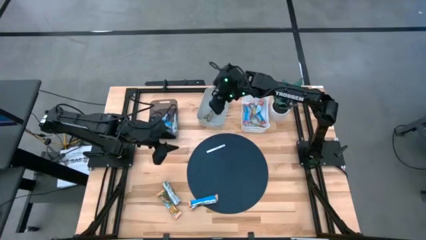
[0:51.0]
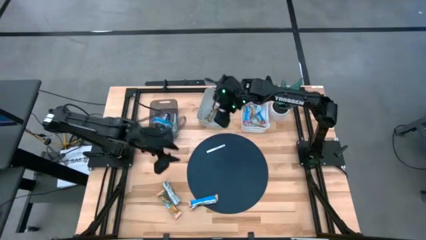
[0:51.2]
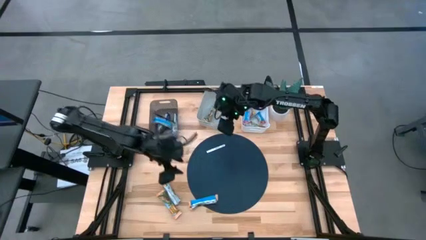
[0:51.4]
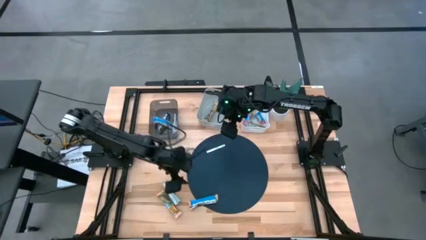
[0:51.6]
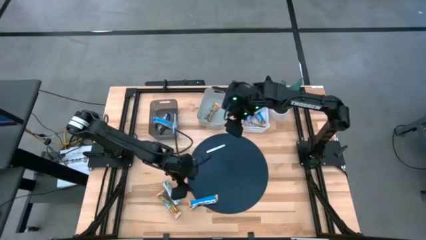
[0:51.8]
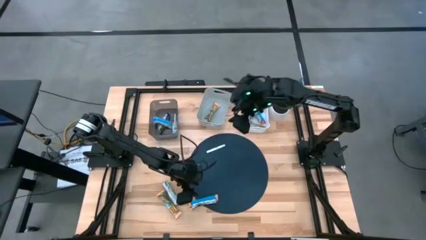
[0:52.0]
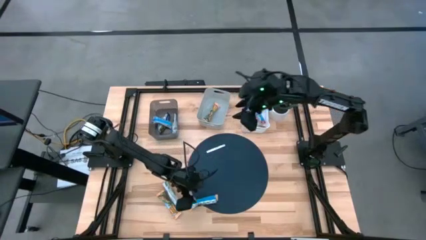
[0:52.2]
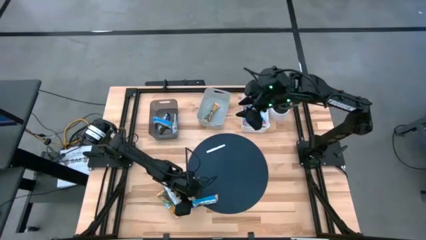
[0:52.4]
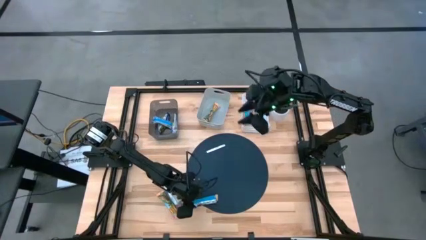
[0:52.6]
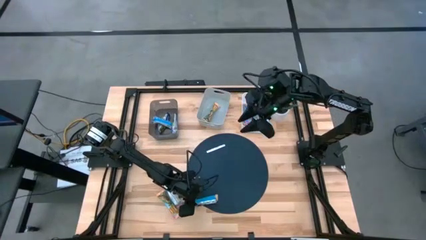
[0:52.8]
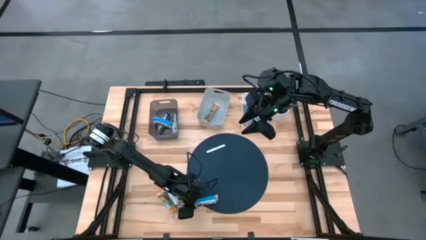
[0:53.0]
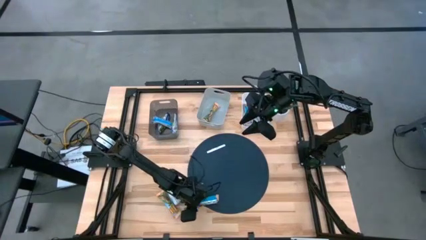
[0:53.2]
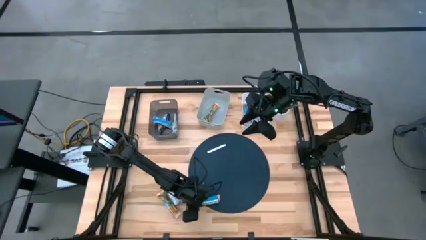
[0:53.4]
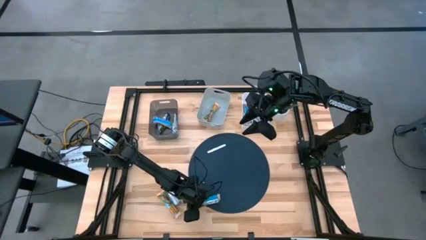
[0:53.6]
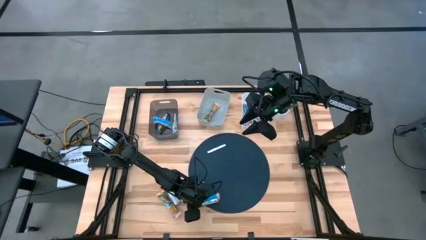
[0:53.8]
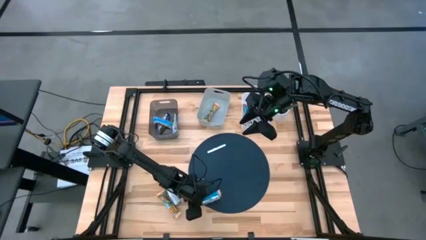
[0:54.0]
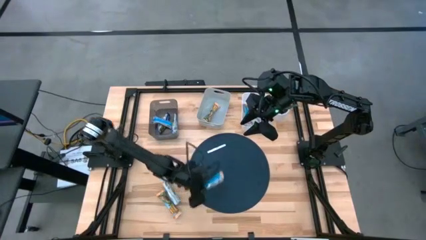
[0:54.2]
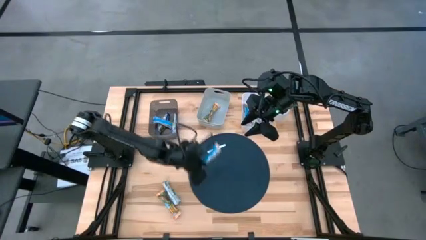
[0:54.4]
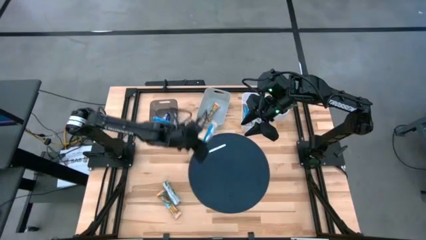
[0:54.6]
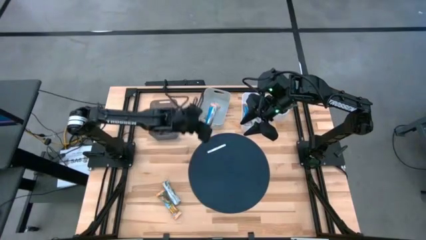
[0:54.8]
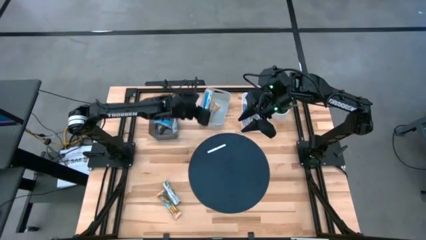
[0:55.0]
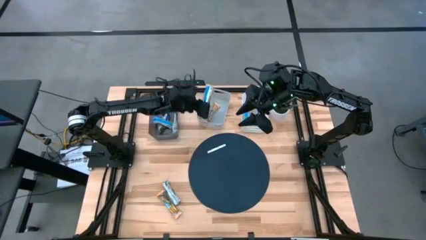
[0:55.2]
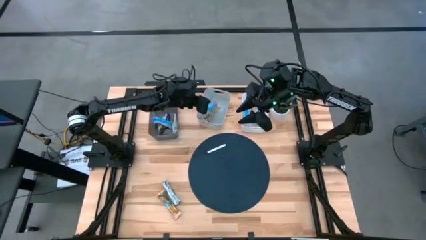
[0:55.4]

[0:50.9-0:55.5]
Task: Pick and place Granola Bars by type
Put the yellow granola bar into the gray bin

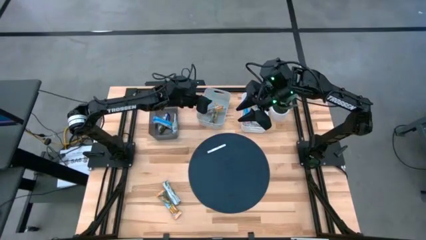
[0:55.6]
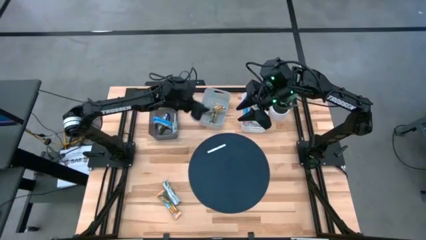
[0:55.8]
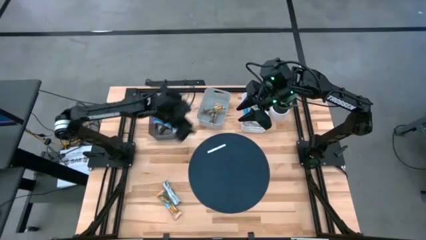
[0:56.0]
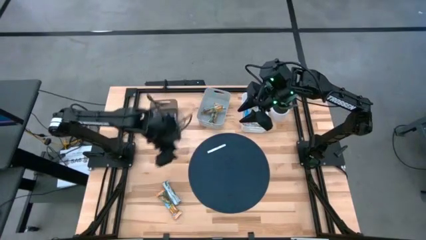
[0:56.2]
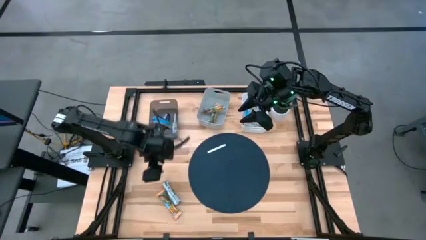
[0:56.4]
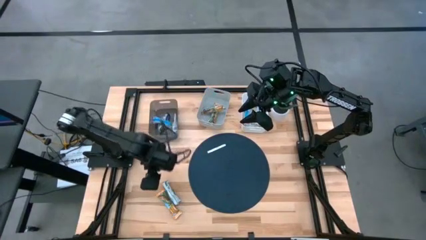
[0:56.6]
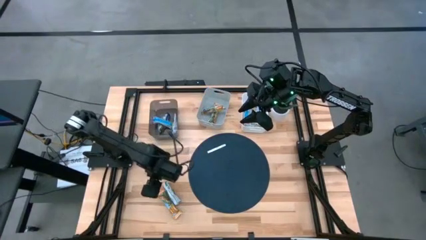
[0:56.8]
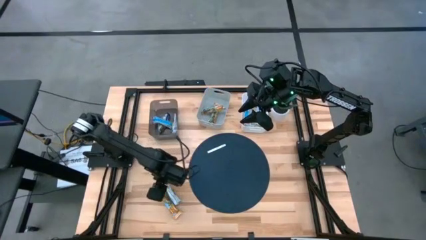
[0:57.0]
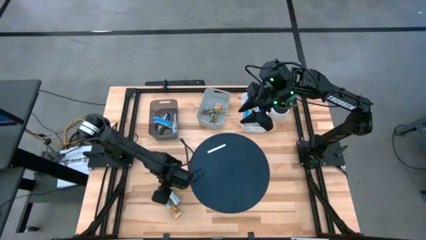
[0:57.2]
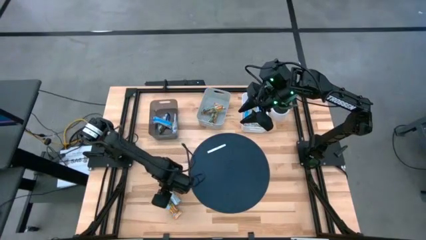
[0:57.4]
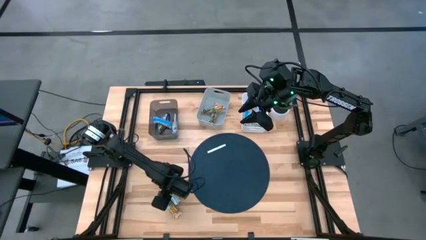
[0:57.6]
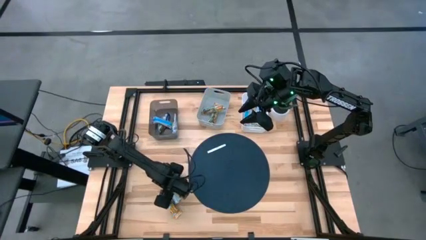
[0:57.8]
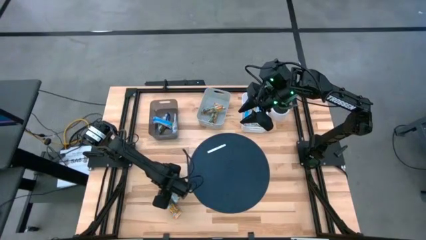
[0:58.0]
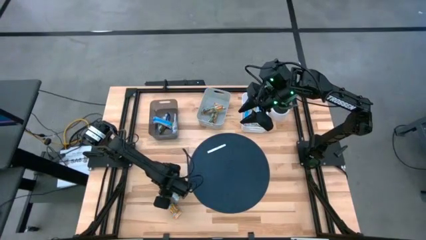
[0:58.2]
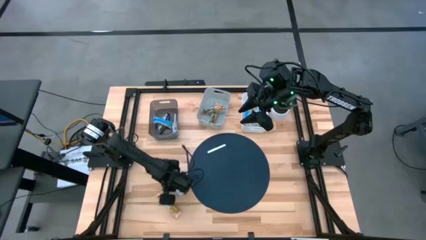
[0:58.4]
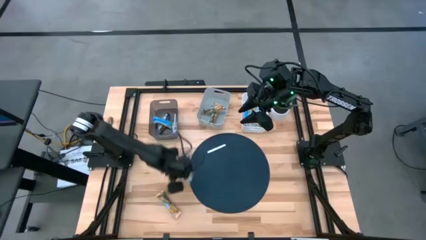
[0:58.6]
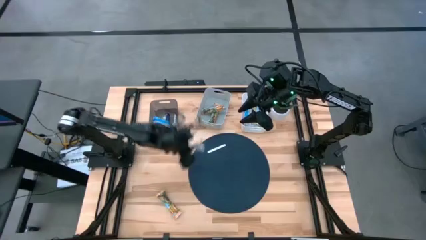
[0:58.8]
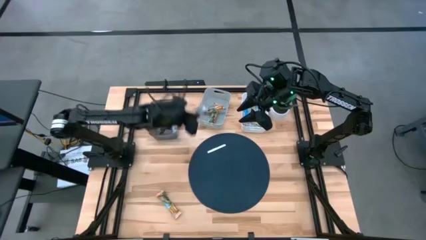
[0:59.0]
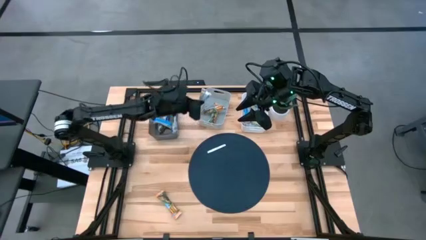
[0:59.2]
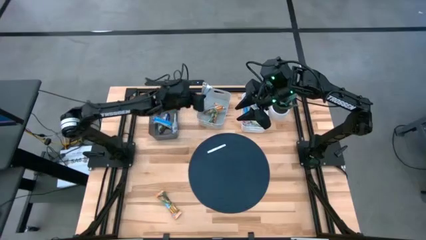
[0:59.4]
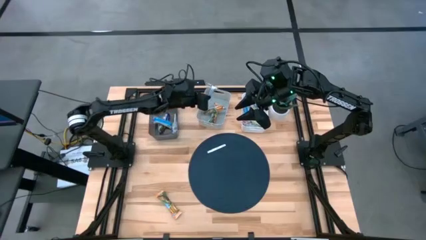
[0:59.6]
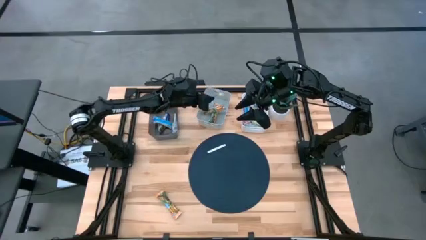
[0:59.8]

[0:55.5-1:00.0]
Put the yellow granola bar into the gray bin

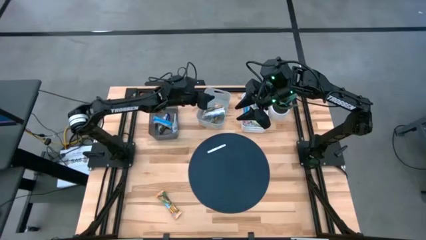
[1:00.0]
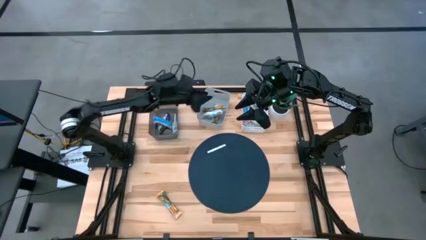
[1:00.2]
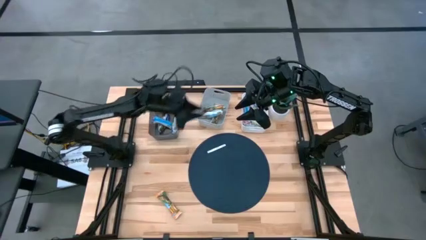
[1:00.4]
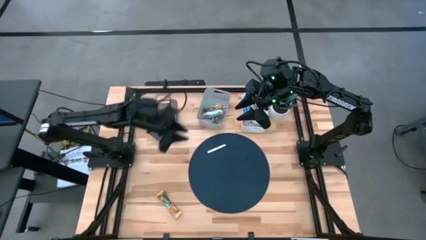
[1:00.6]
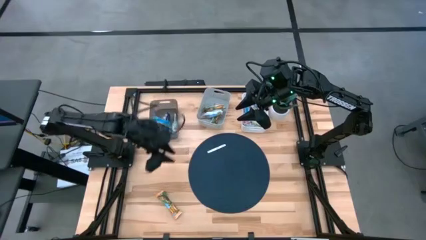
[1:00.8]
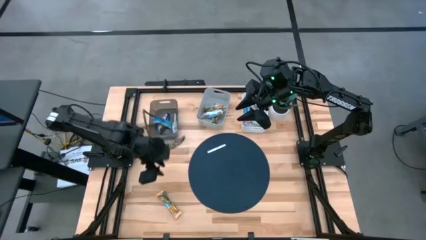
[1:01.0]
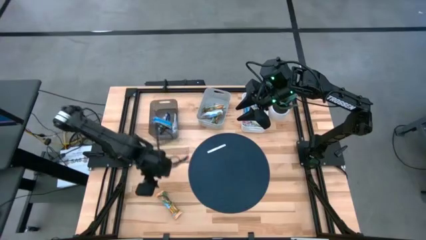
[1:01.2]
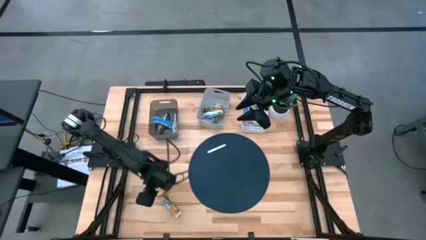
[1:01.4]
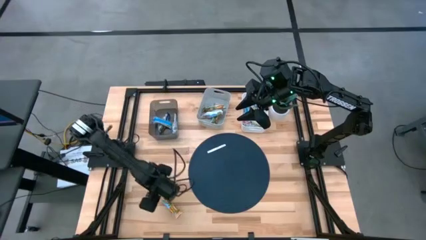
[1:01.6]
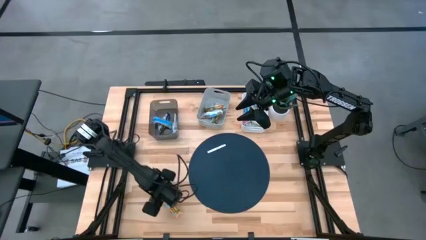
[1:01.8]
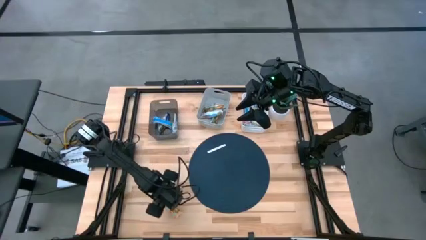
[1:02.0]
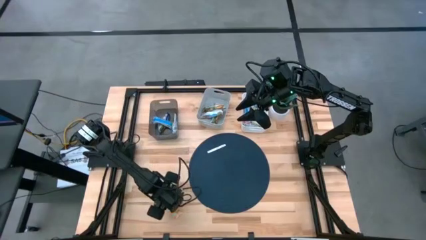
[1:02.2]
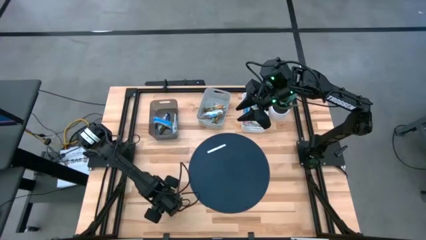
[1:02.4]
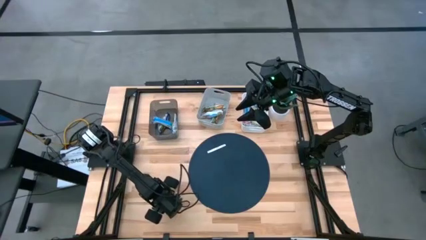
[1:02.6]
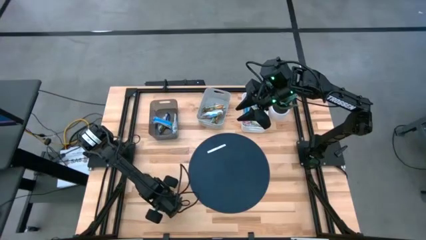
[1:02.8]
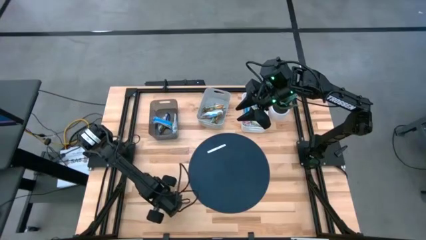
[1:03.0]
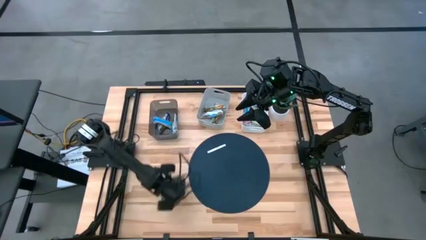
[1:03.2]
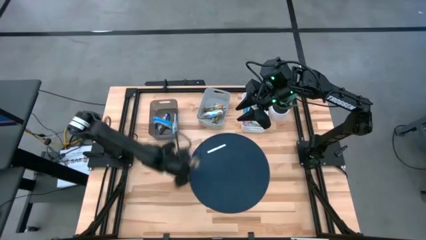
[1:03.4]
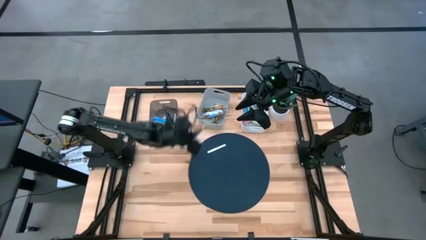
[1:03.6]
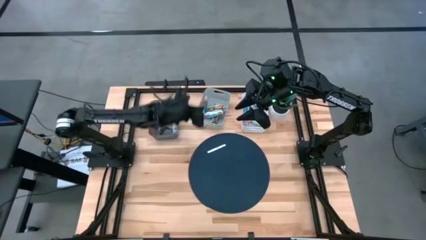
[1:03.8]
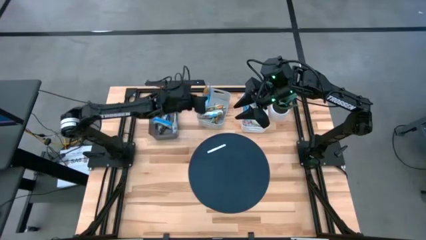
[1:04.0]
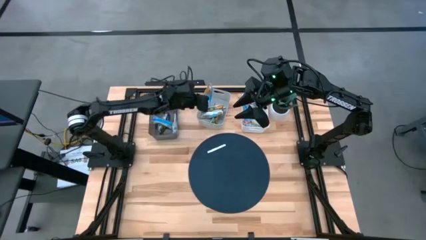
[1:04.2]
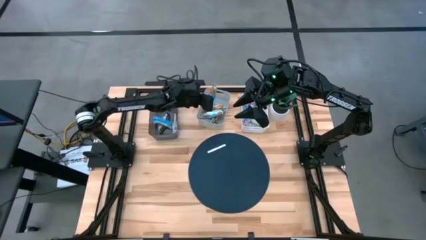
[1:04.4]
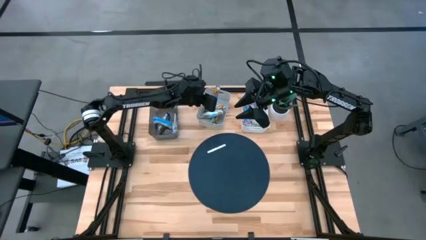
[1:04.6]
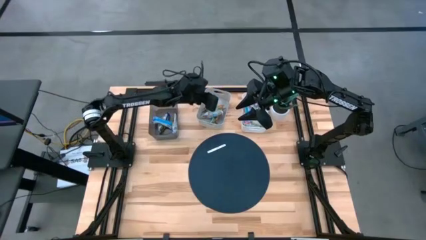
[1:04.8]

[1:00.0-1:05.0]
Put the yellow granola bar into the gray bin

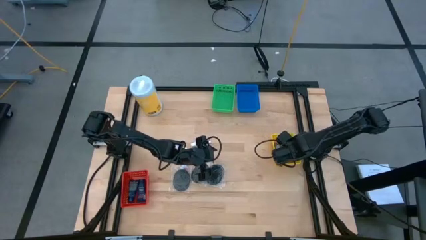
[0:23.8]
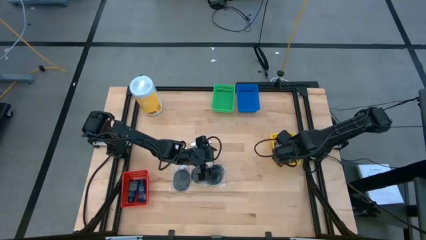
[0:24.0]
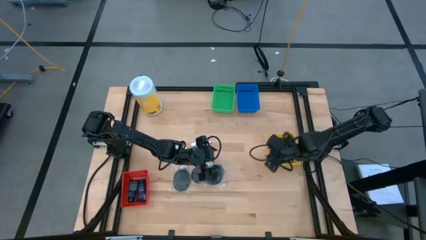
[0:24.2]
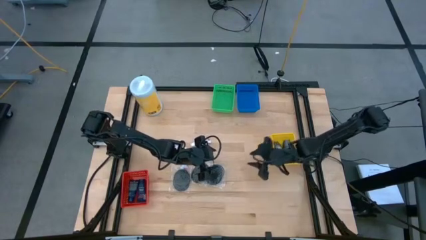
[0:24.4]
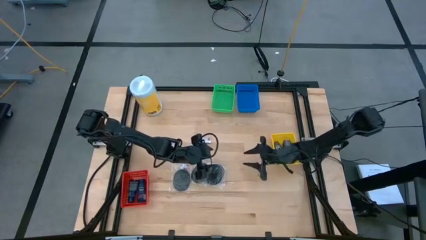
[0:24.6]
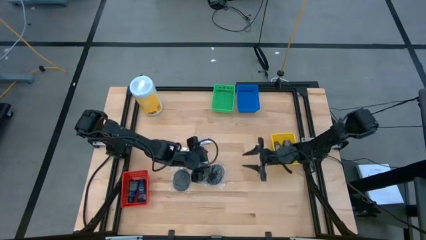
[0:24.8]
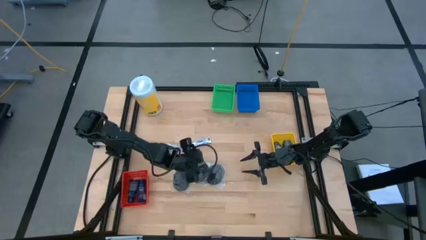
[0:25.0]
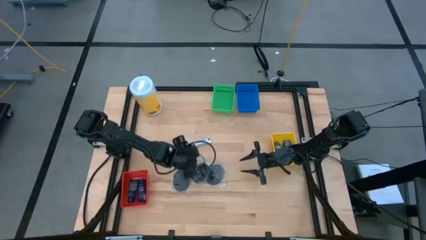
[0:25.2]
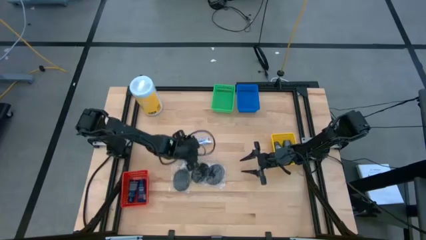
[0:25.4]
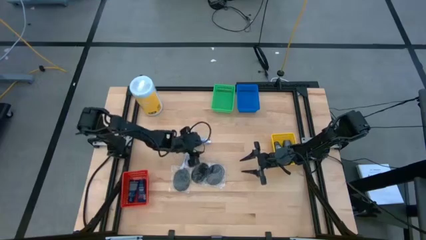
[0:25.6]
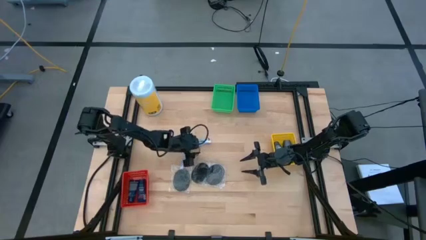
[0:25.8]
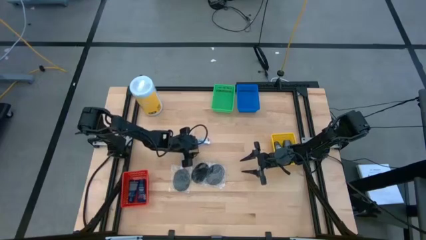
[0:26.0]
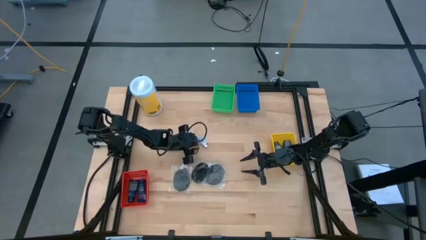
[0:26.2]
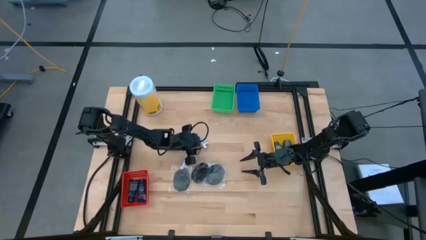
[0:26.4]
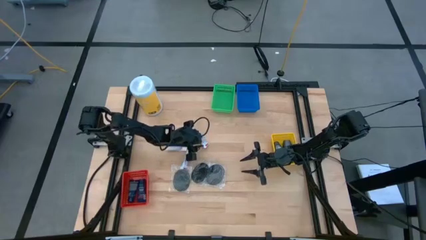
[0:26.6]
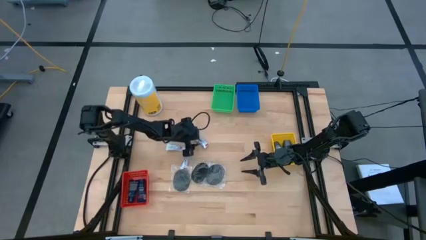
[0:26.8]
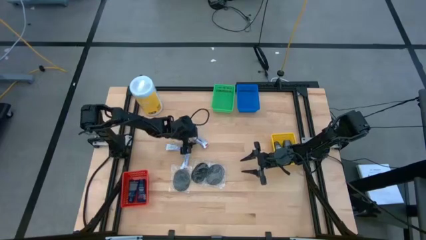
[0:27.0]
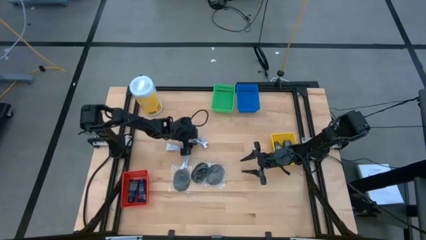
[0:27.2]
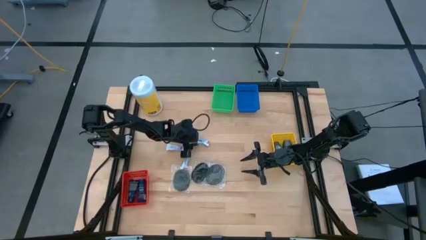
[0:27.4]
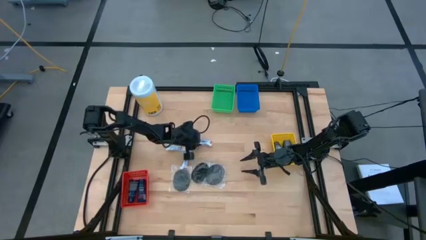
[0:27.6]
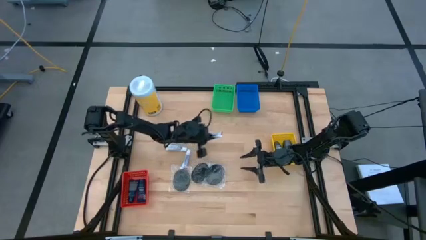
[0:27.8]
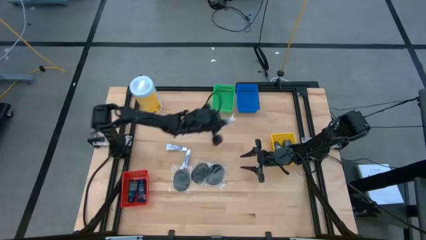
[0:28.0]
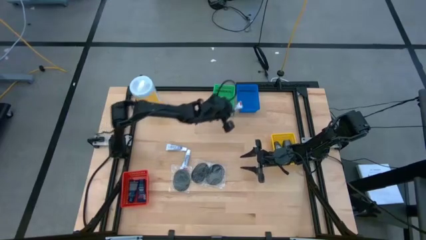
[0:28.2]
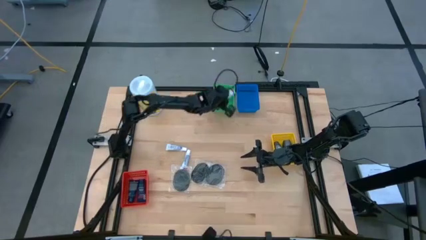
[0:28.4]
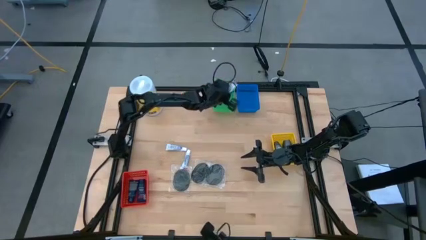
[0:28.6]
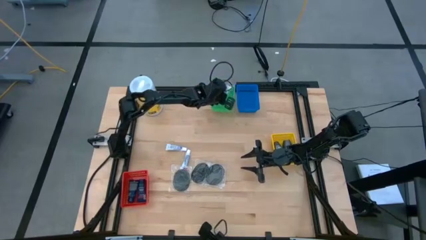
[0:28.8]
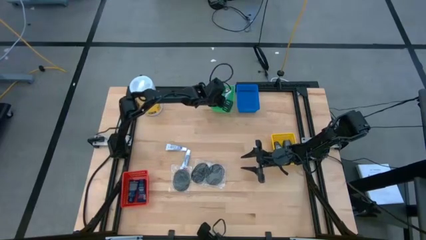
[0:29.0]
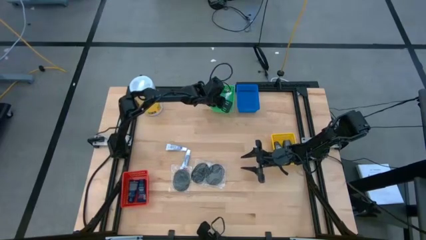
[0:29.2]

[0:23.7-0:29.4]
Task: Pick & Place Travel size toiletries
Put the white toothpaste into the green basket
